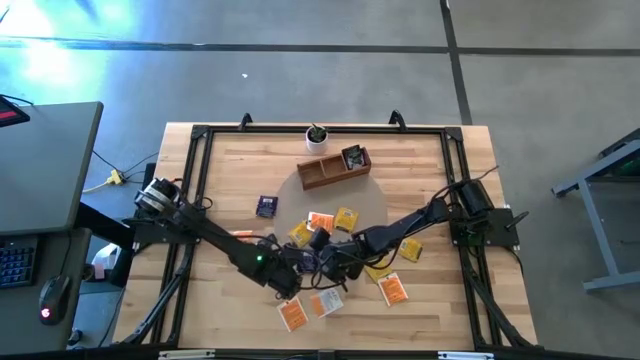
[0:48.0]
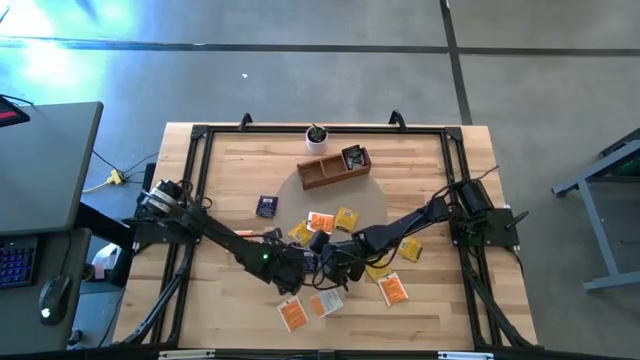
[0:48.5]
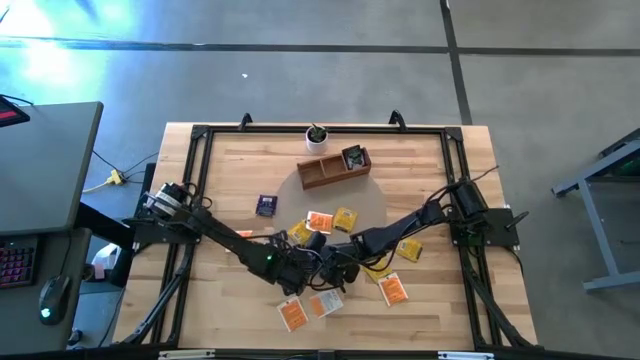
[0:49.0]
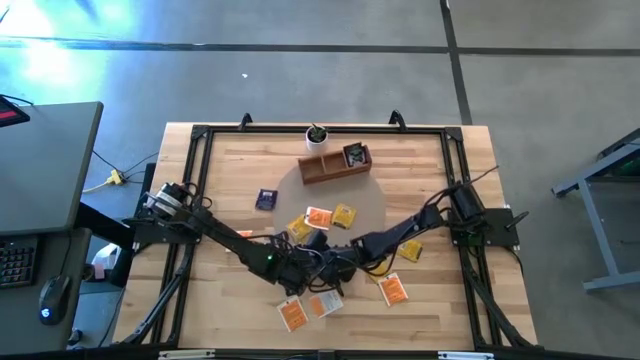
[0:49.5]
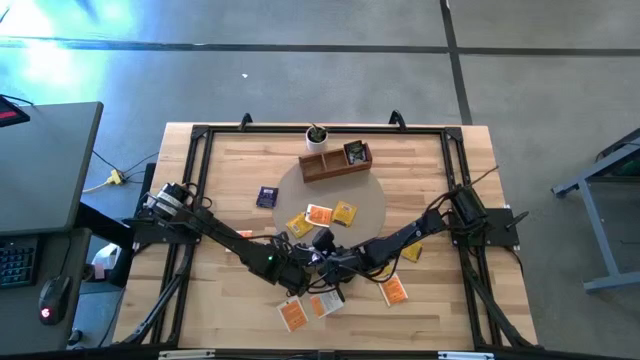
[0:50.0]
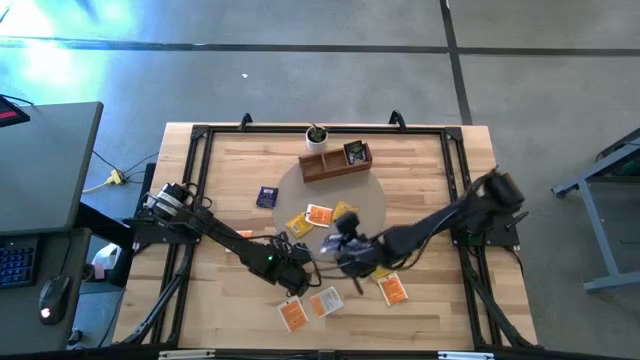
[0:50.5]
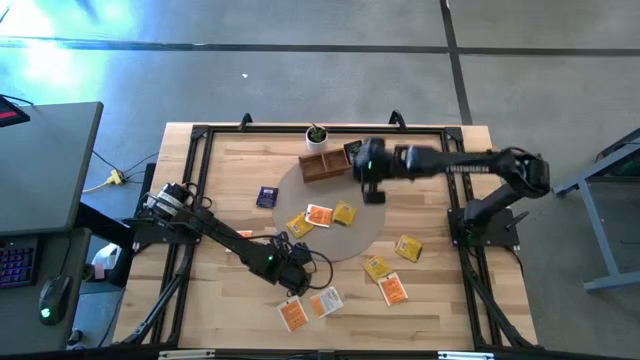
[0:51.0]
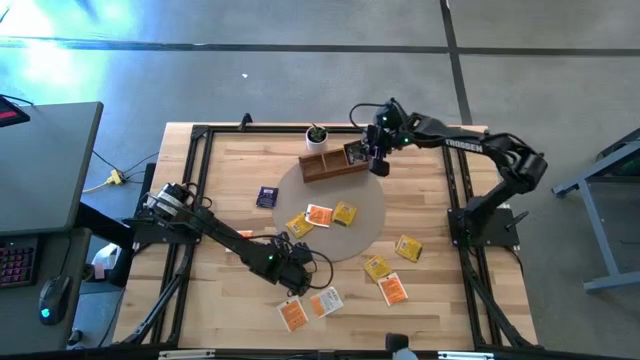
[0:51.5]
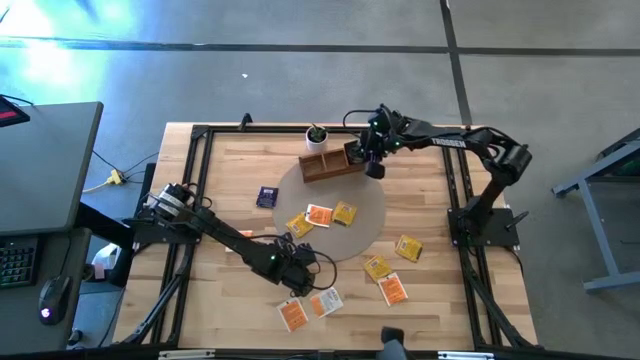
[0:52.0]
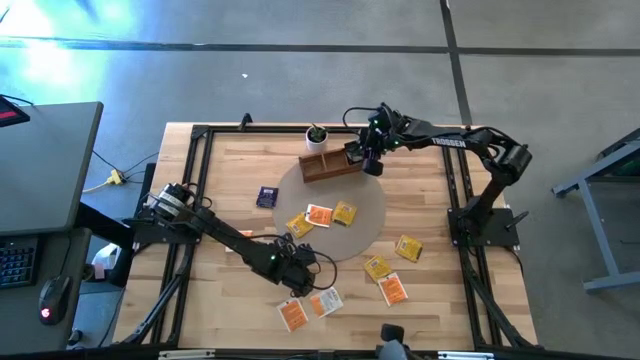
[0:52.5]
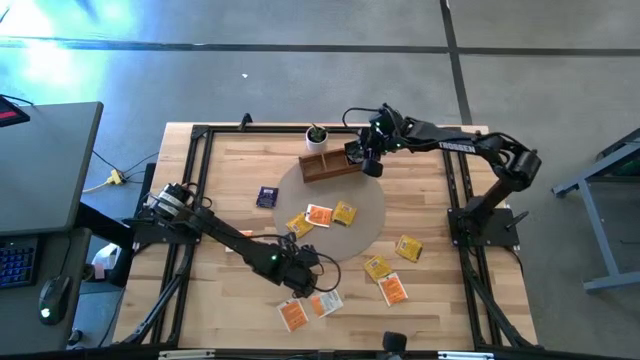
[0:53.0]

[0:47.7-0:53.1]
Task: Pick & Place Tea
Put the bottom purple tea bag into the right section of the wooden organizer

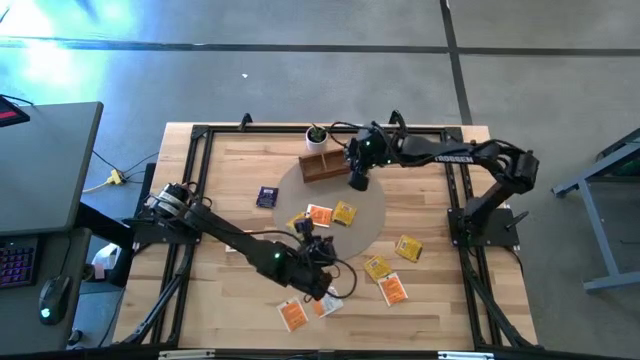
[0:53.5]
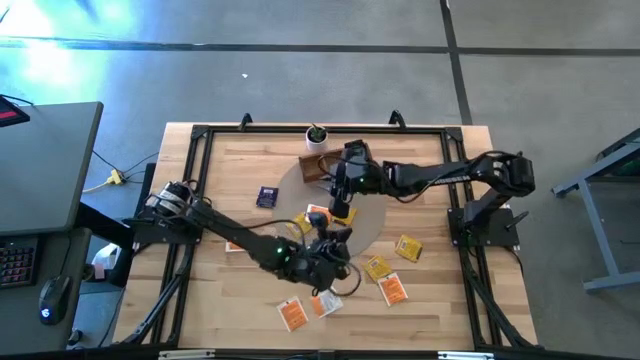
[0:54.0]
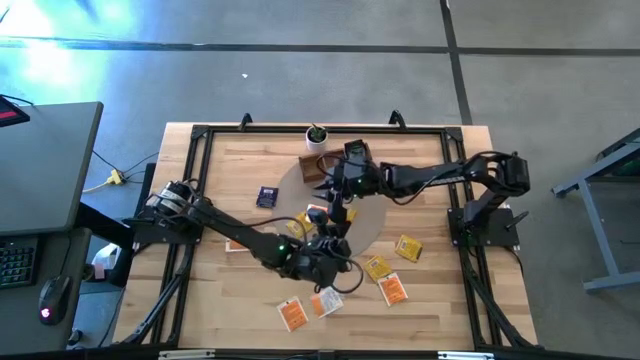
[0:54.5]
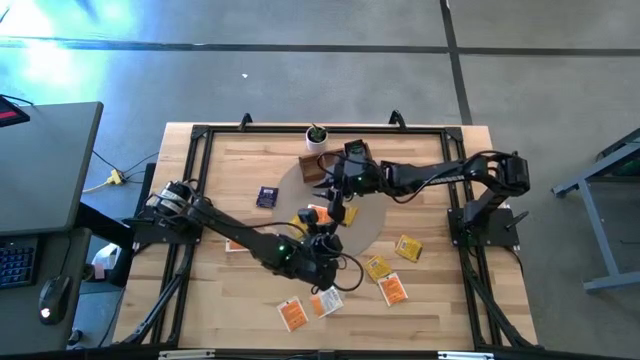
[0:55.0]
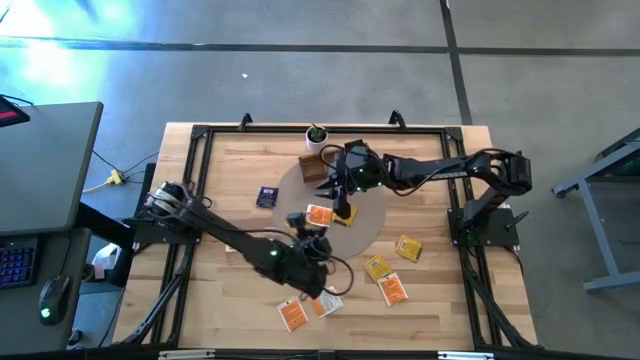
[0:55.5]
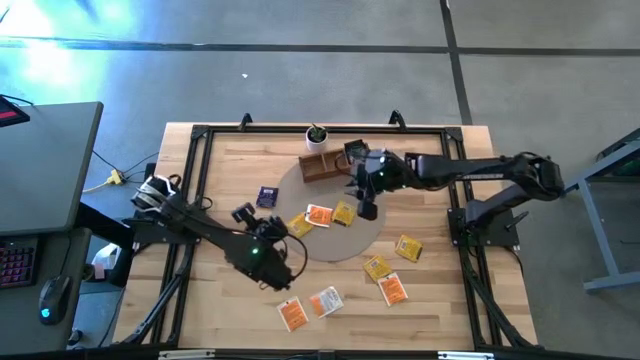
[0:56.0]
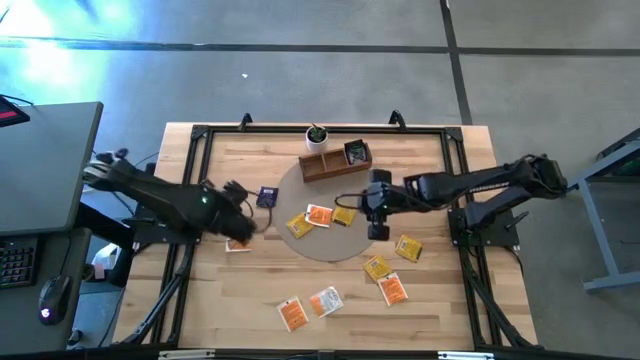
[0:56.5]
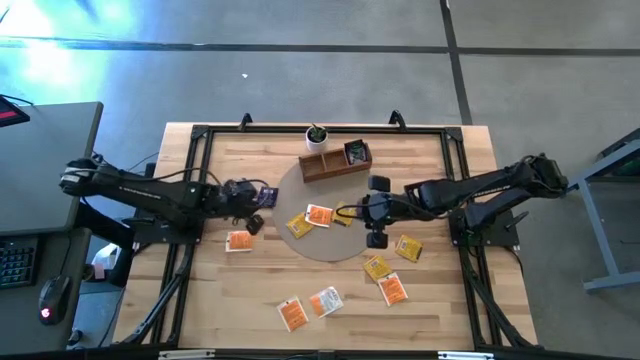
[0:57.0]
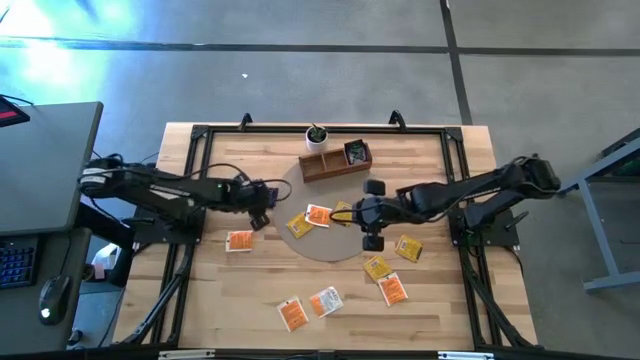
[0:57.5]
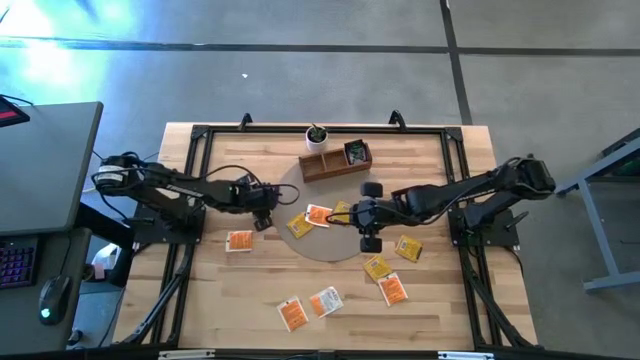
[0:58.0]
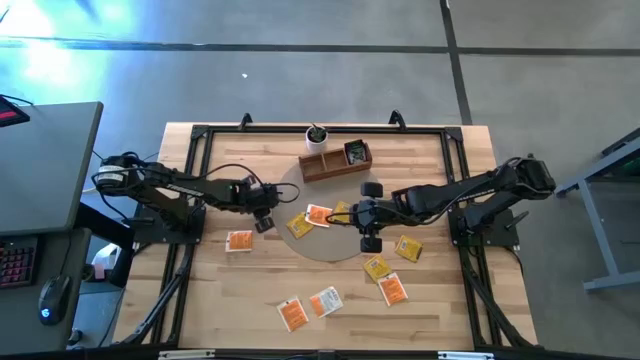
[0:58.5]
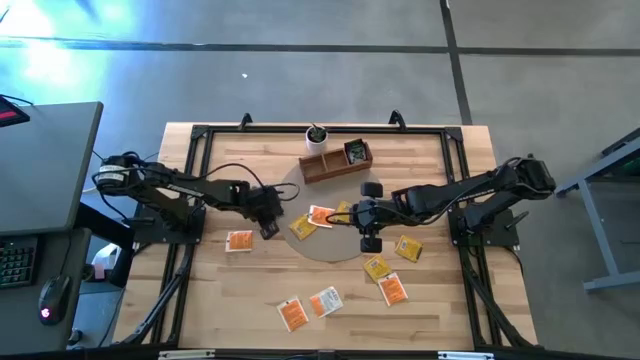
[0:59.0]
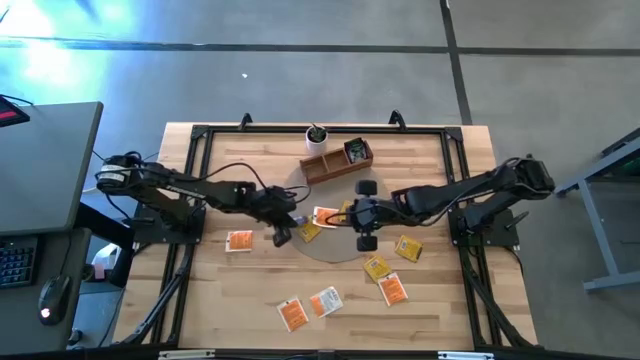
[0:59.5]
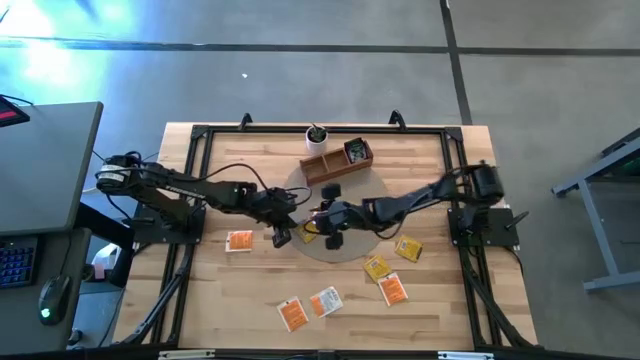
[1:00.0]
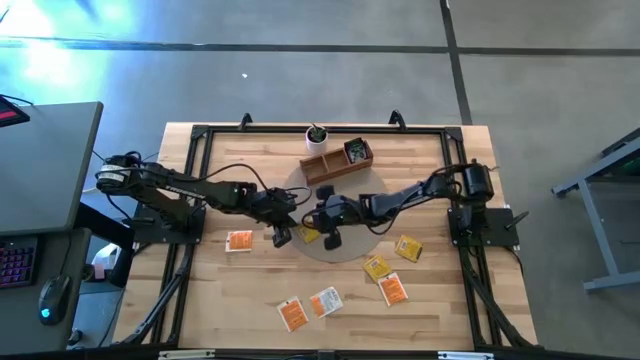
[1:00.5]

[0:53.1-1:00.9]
Put the purple tea bag into the right section of the wooden organizer

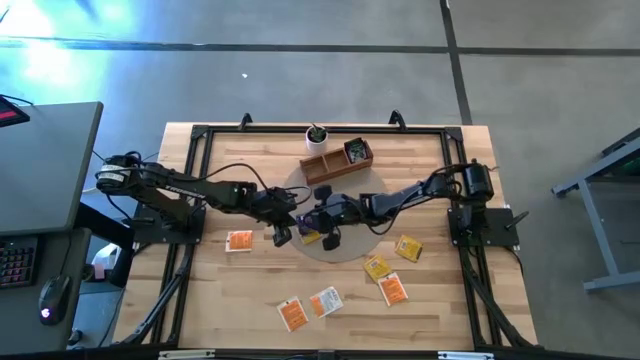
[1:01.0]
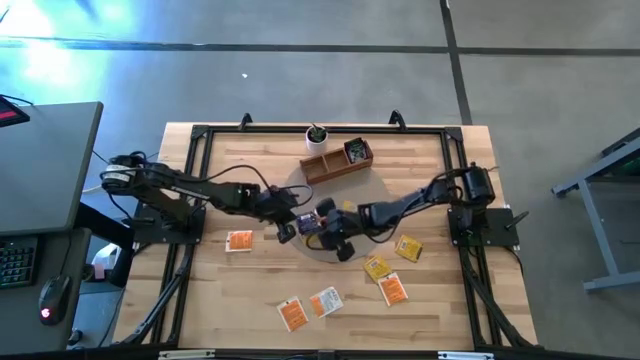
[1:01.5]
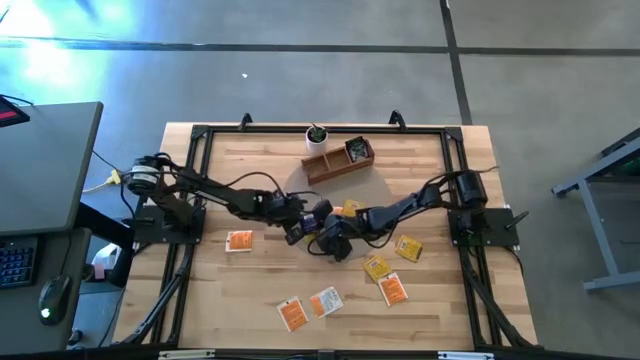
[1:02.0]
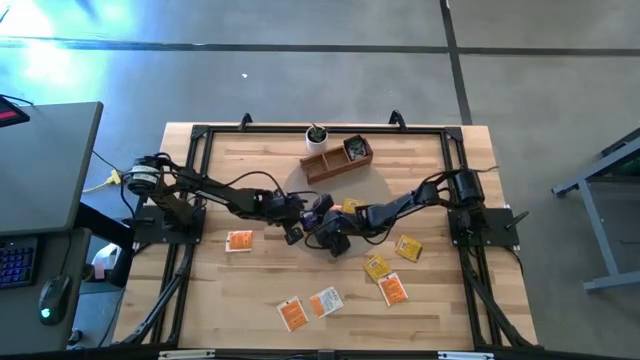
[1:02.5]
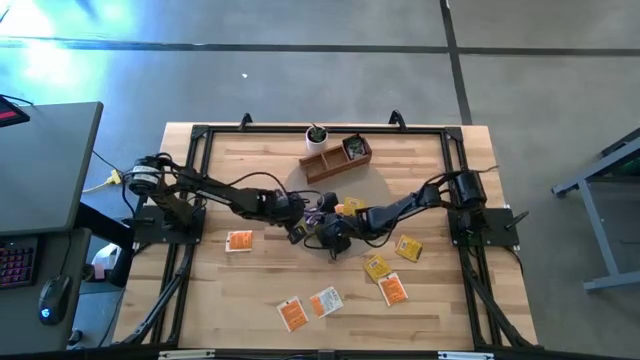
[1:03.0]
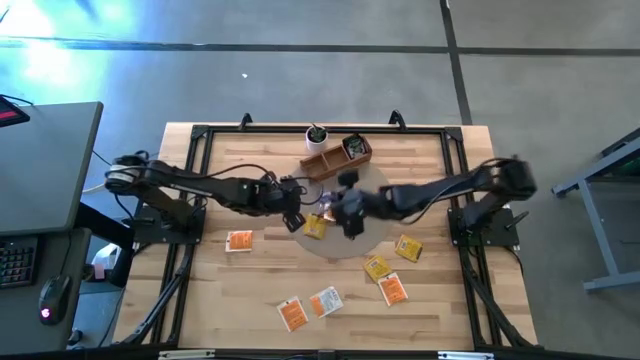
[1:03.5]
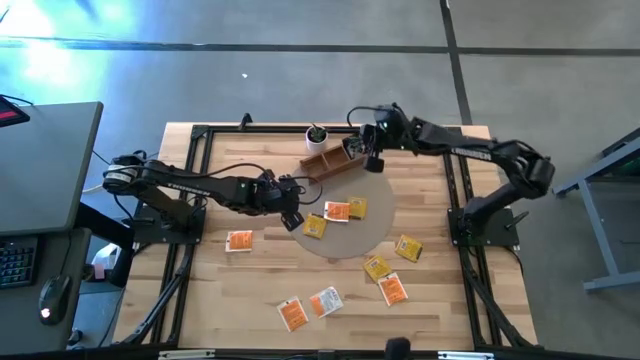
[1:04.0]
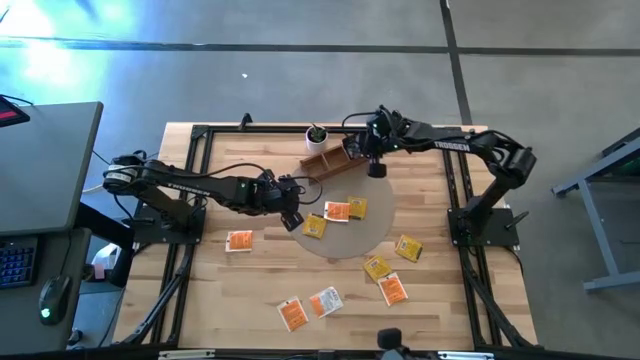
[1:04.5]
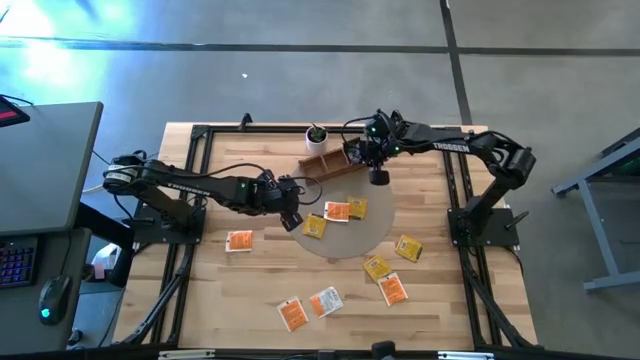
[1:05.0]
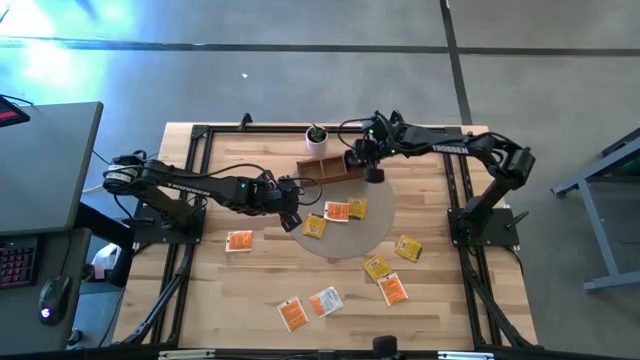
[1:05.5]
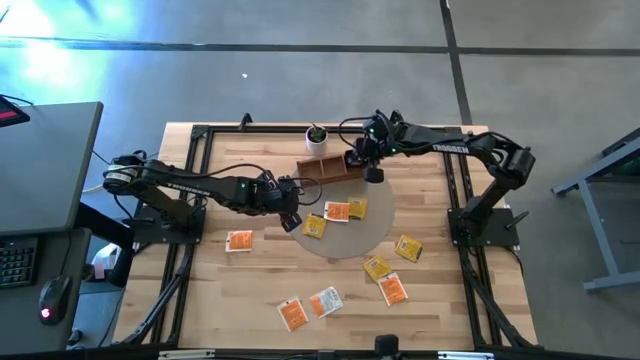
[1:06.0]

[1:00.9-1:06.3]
Put the purple tea bag into the right section of the wooden organizer

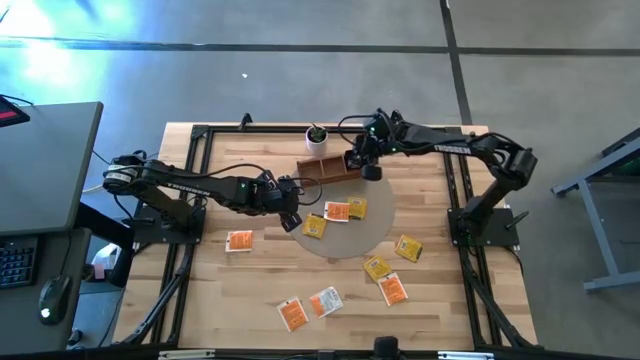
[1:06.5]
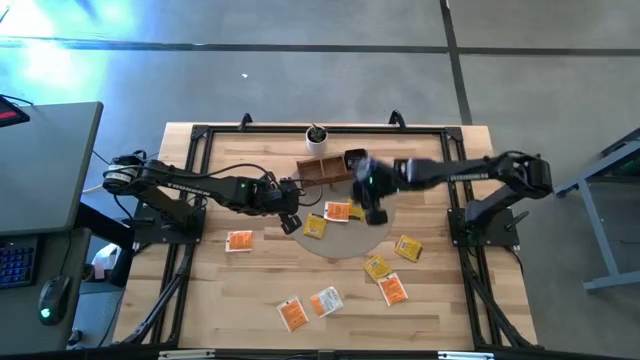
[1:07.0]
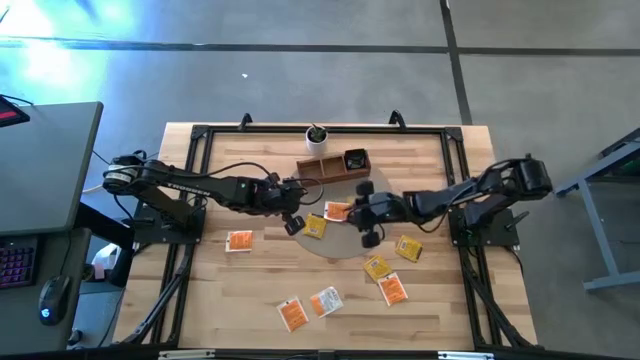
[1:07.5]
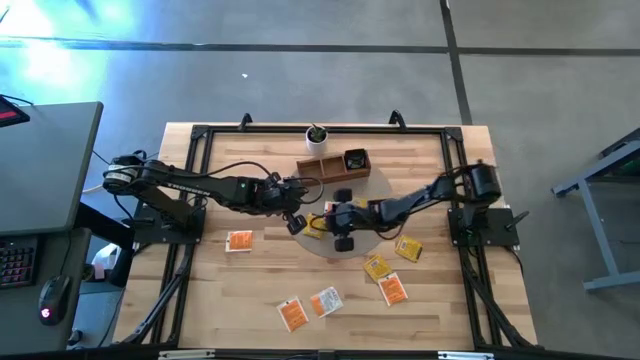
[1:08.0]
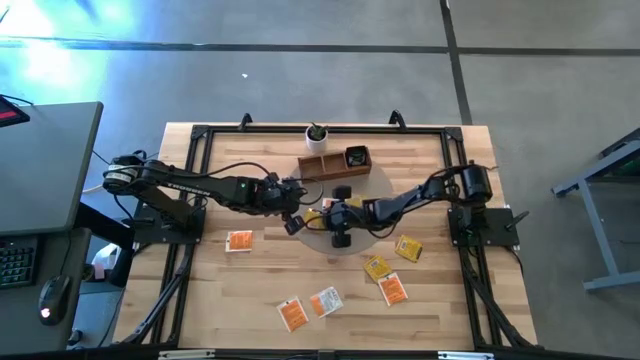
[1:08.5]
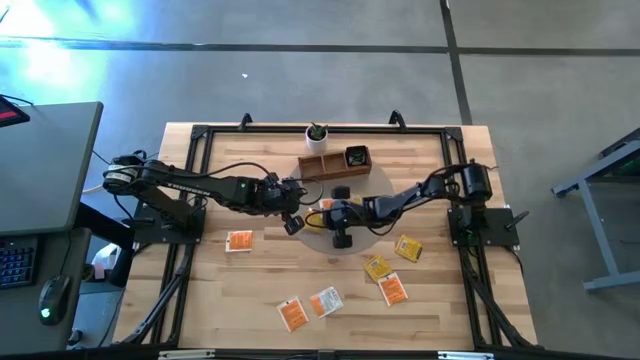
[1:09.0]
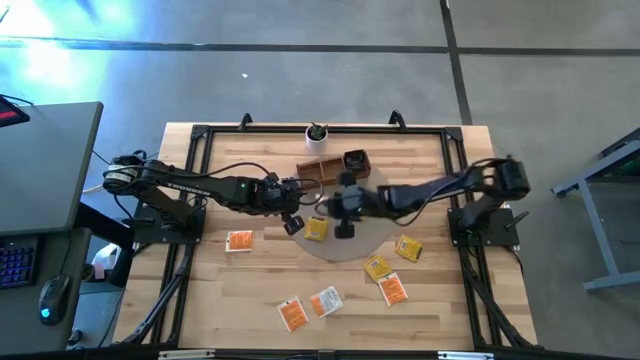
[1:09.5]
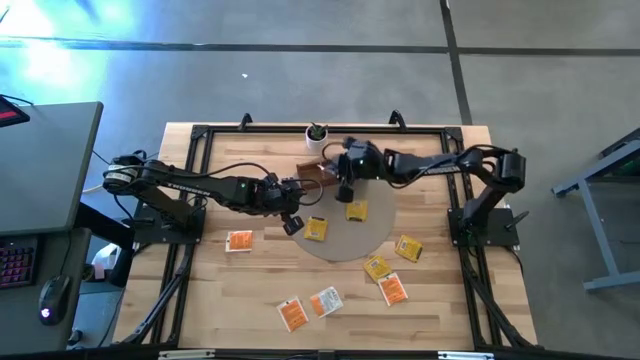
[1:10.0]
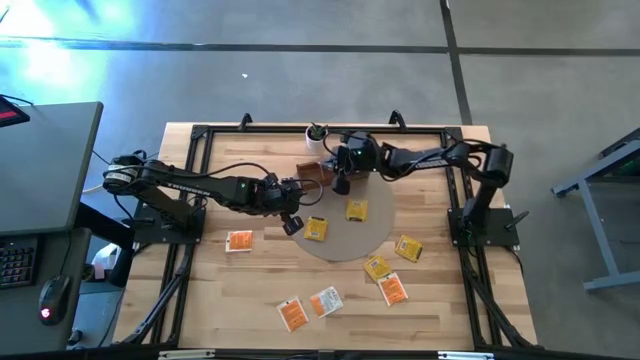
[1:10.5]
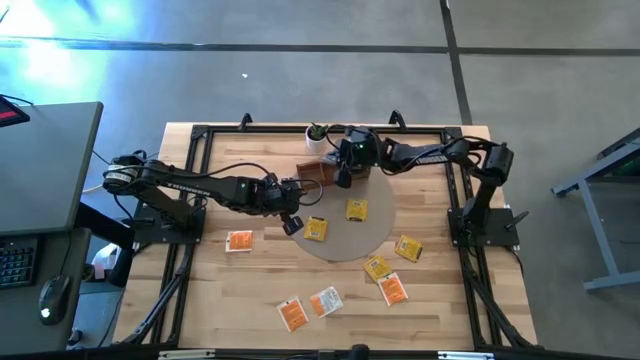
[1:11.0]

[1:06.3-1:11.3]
Put the orange tea bag into the middle section of the wooden organizer
